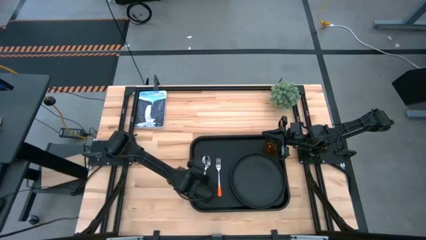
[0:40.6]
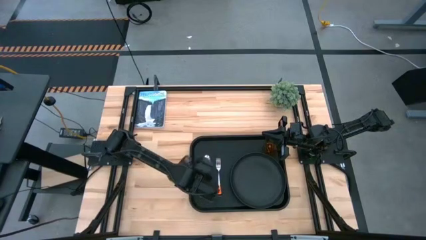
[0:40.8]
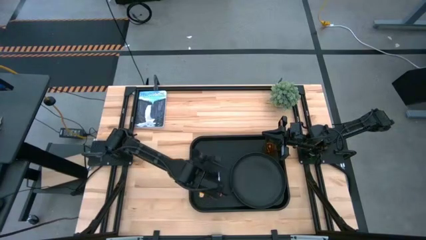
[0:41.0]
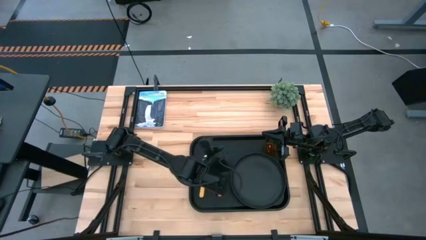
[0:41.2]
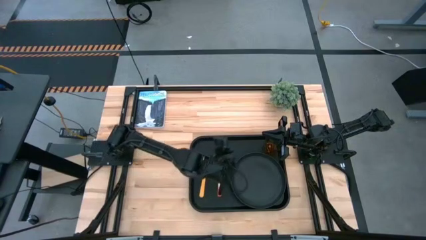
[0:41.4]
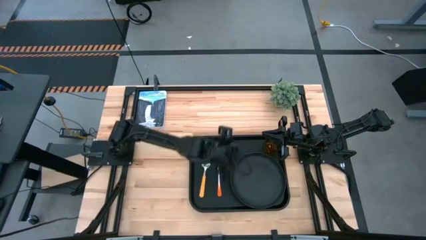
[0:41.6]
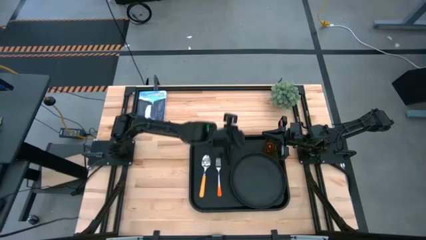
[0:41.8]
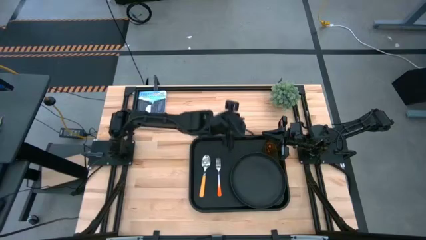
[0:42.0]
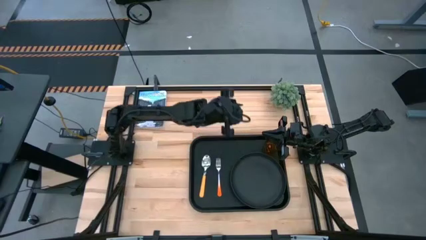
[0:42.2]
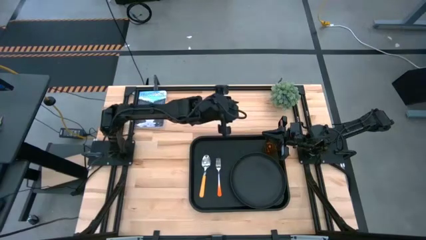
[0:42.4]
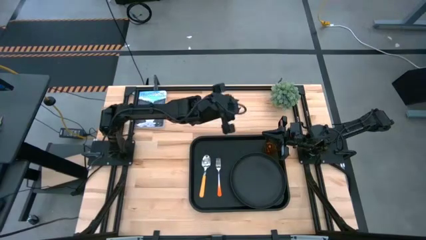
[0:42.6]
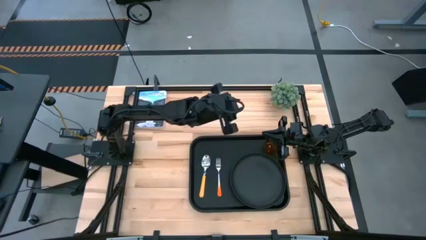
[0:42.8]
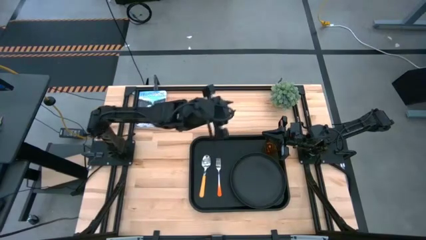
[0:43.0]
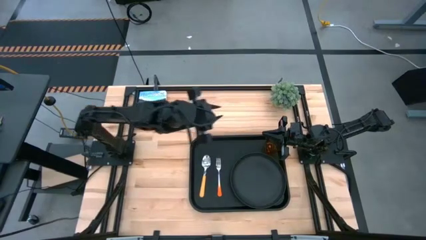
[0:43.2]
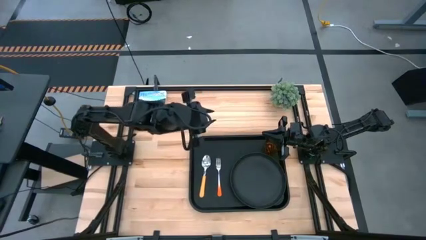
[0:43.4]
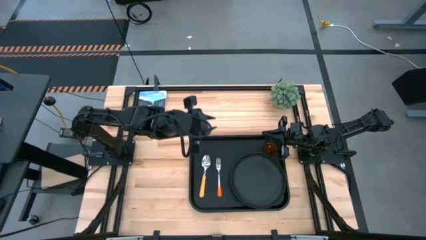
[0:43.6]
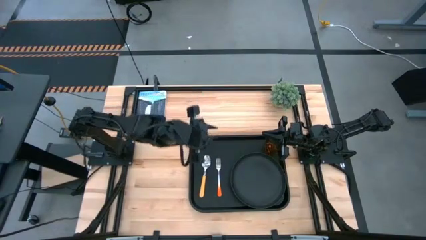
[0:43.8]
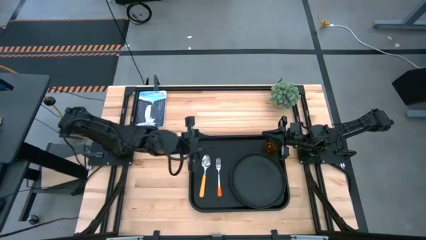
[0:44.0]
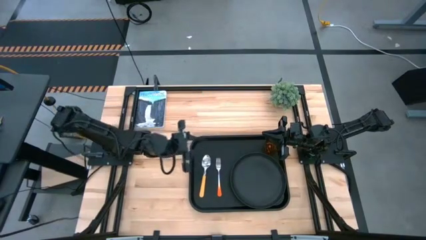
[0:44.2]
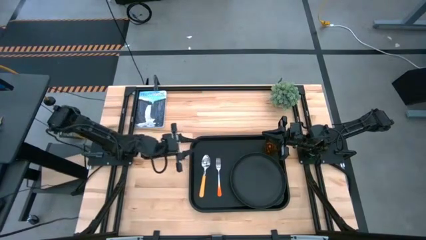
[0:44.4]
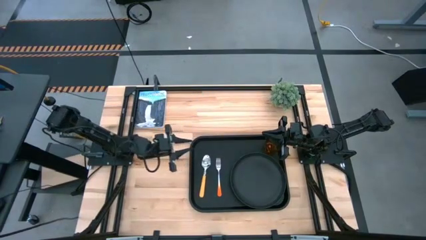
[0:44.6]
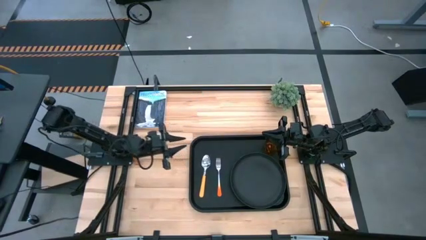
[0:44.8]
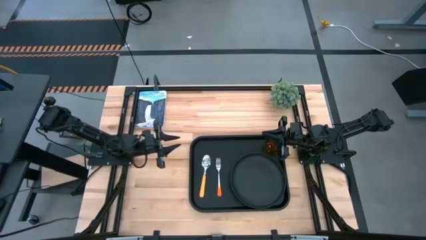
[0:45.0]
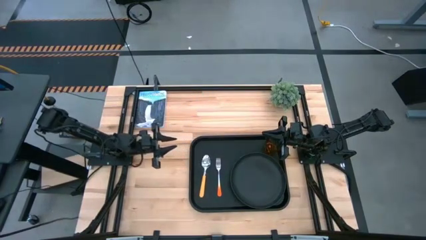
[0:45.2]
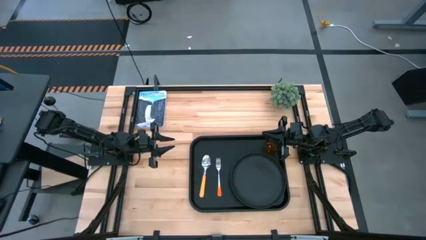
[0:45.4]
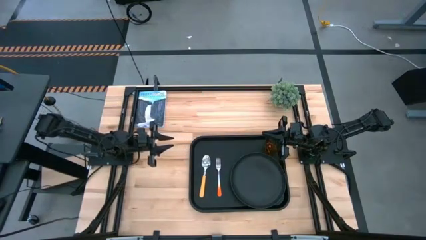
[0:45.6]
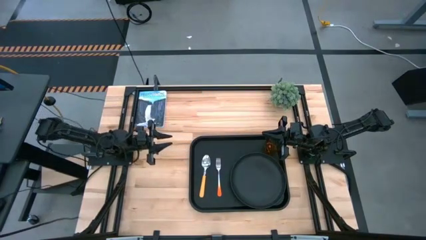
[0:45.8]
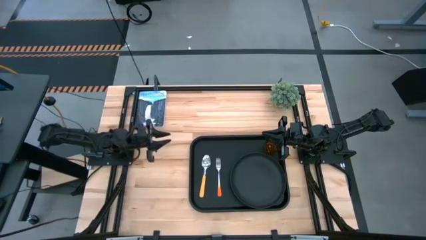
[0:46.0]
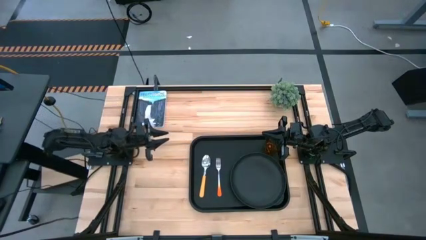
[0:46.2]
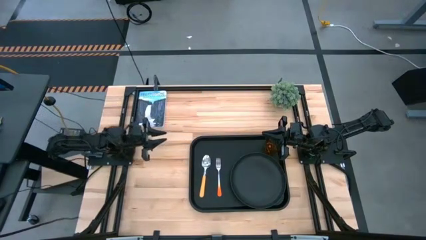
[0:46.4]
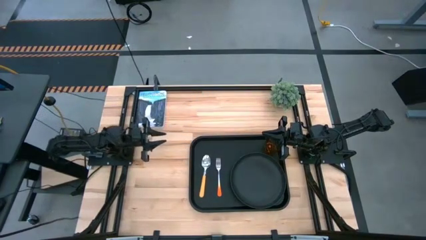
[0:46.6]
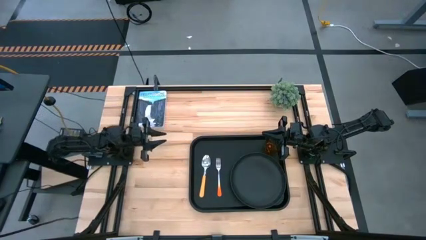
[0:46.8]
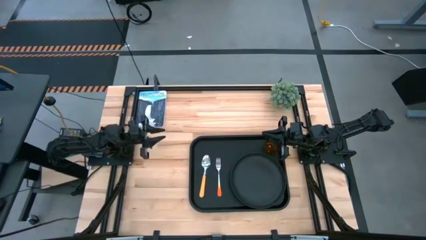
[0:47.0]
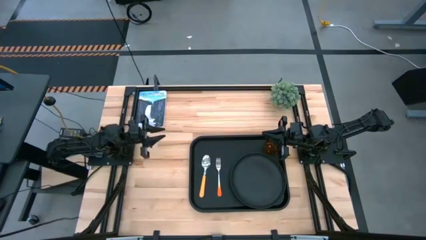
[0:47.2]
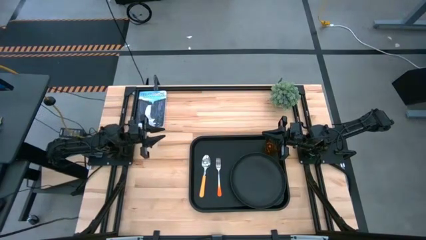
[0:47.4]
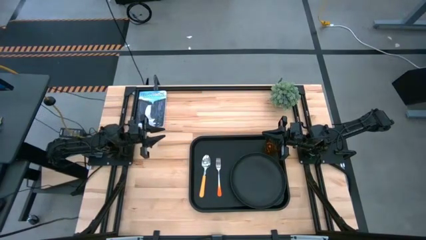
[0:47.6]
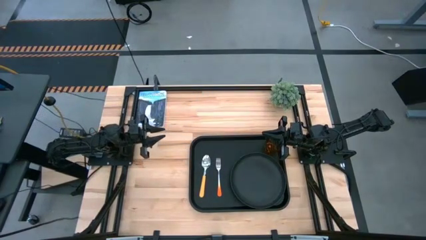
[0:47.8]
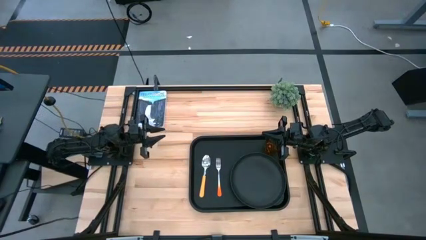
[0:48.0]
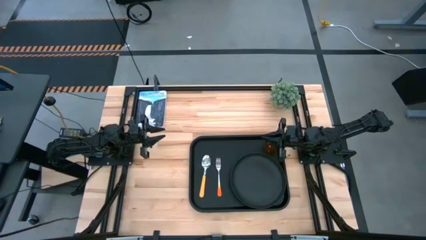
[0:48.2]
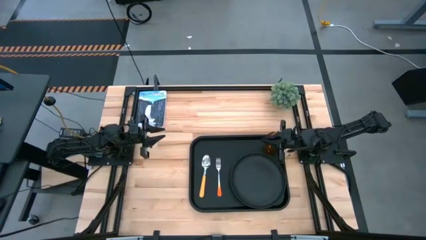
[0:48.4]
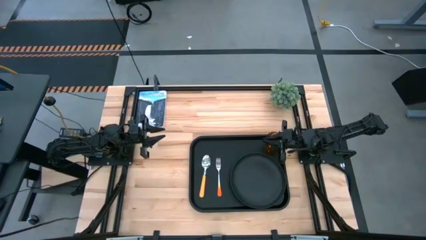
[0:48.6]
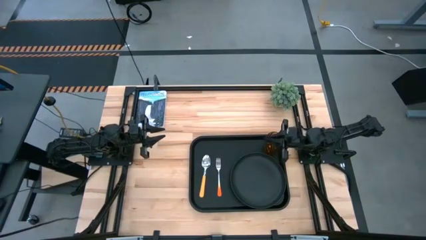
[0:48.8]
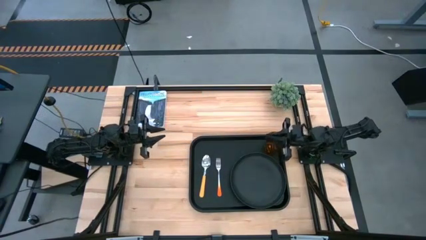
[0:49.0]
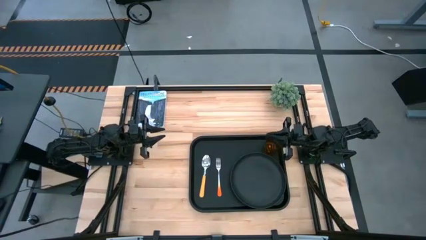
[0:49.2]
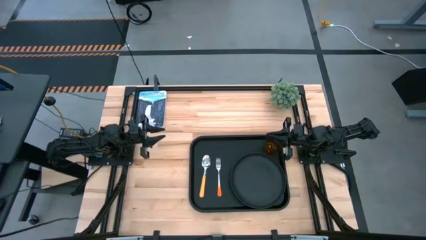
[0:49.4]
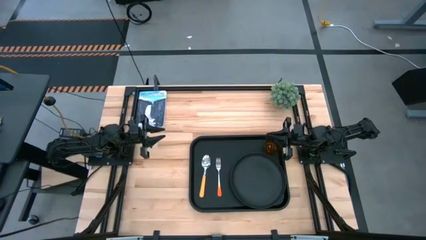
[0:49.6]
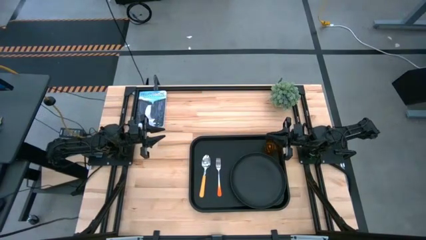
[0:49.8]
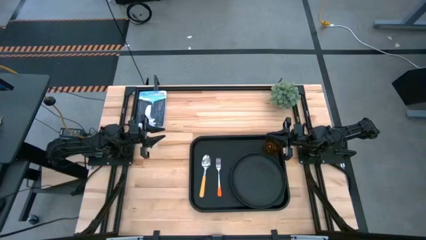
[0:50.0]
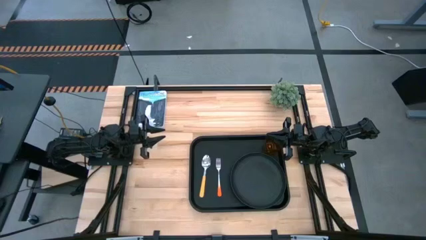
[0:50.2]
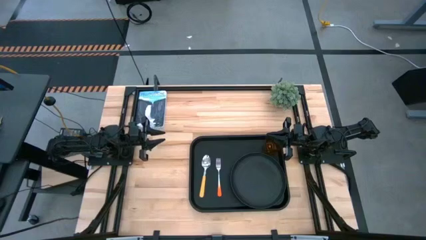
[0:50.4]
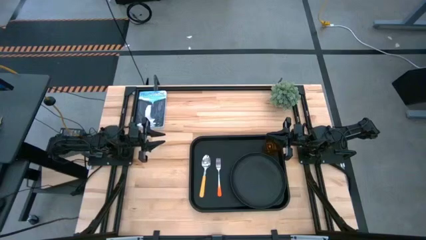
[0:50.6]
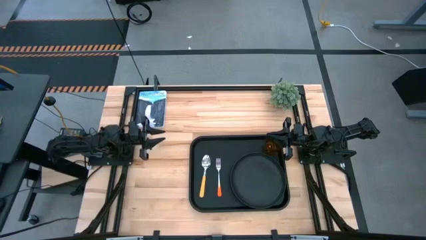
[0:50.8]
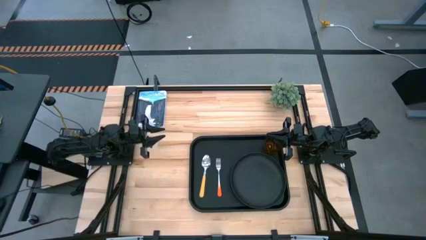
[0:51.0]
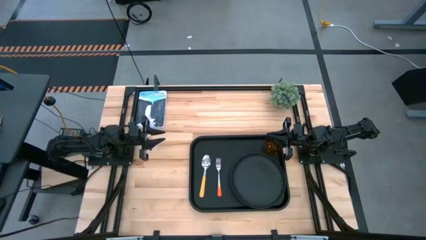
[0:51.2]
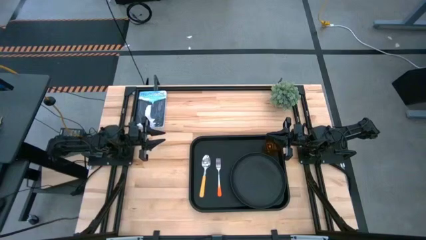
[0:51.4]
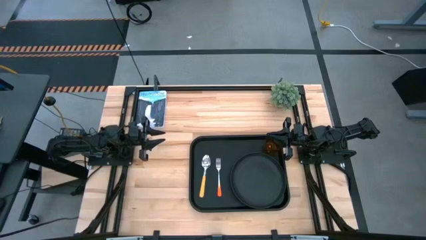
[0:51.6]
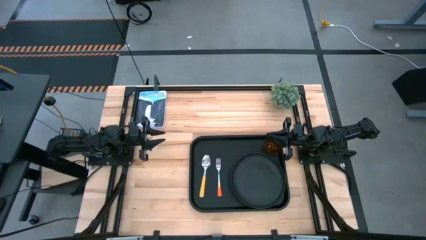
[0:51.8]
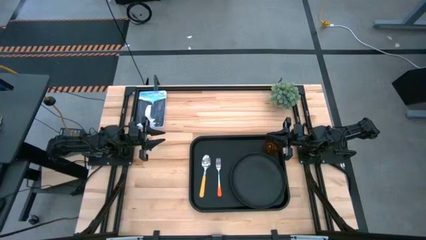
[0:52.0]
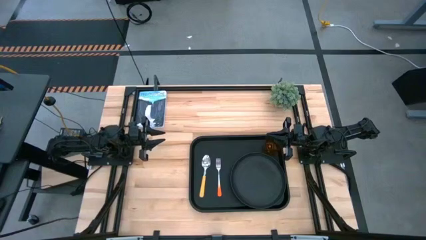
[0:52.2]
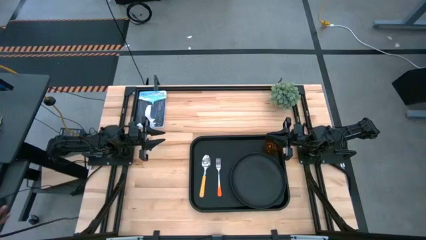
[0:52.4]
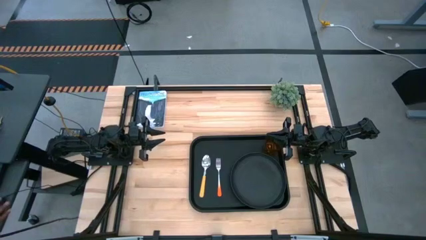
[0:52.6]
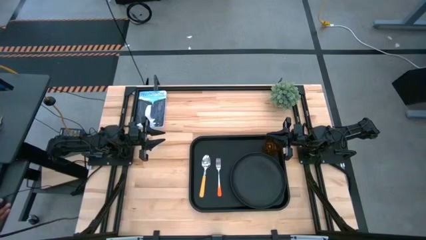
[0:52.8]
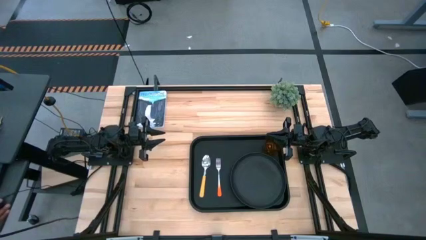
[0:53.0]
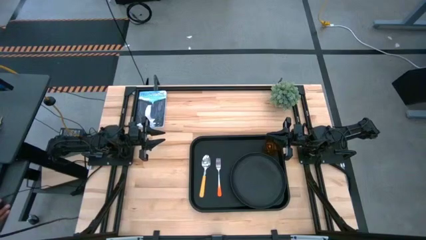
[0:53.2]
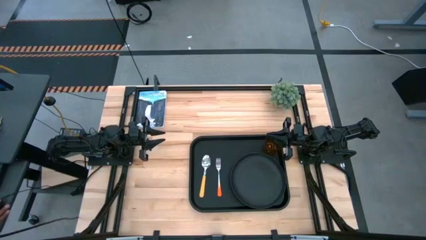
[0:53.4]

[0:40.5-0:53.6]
Task: Pick and place plate/cup/fork/spoon on tray
Return to Home Position

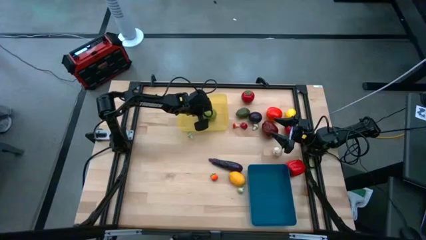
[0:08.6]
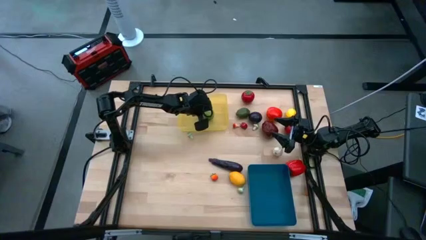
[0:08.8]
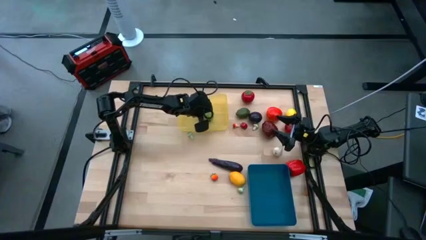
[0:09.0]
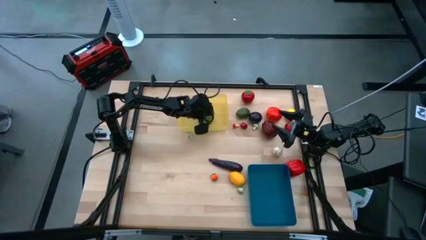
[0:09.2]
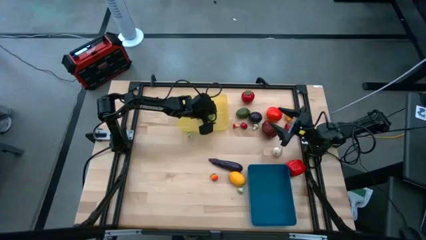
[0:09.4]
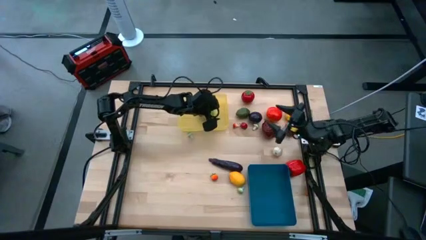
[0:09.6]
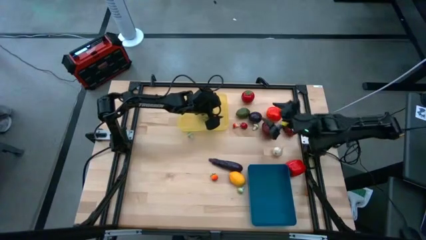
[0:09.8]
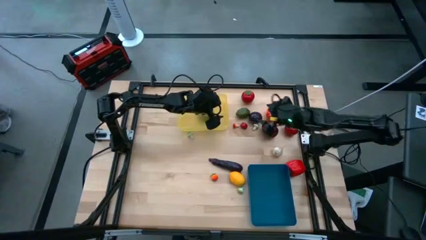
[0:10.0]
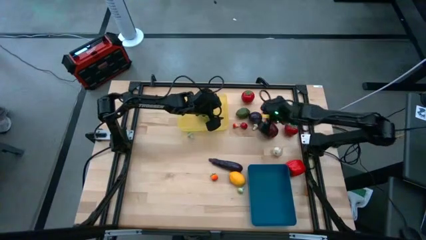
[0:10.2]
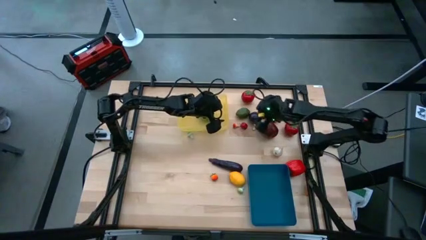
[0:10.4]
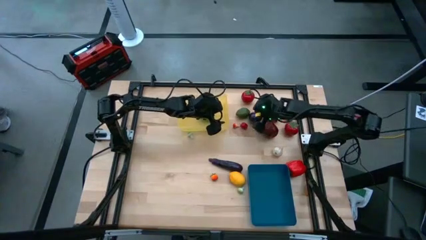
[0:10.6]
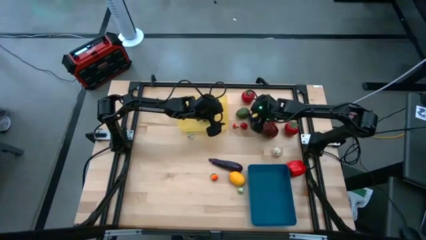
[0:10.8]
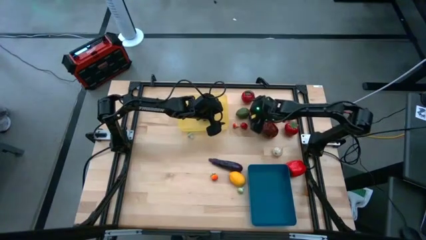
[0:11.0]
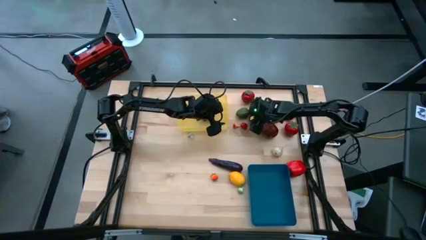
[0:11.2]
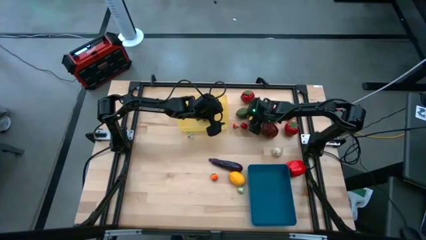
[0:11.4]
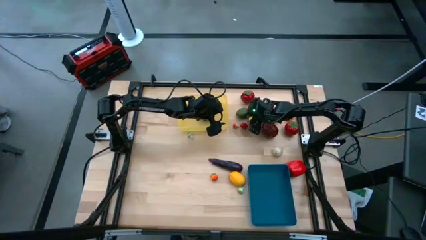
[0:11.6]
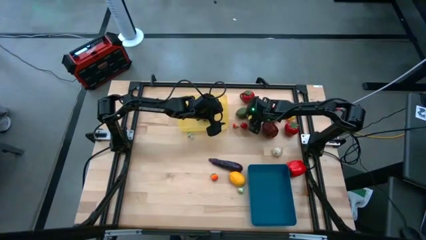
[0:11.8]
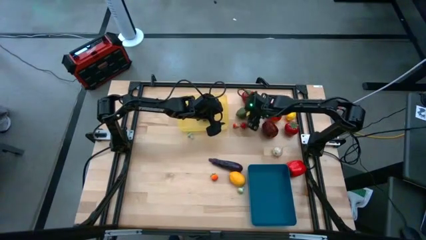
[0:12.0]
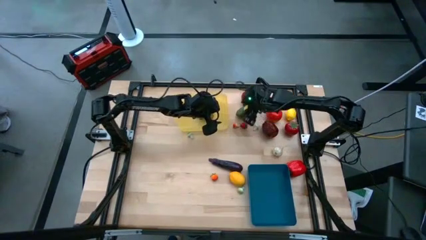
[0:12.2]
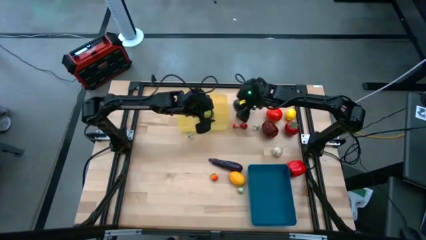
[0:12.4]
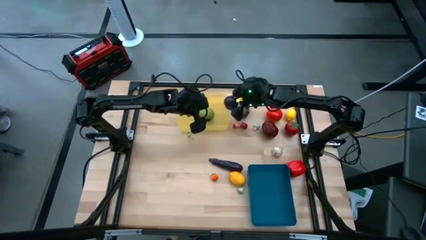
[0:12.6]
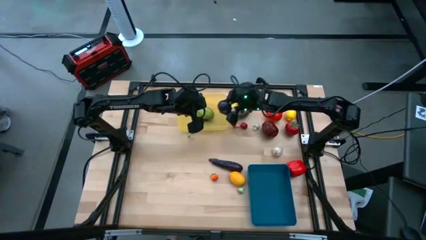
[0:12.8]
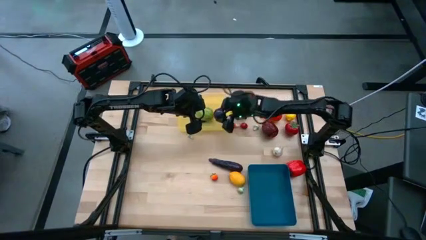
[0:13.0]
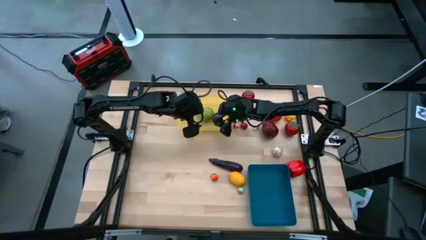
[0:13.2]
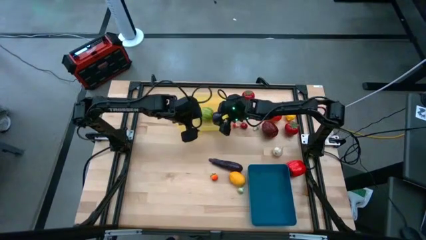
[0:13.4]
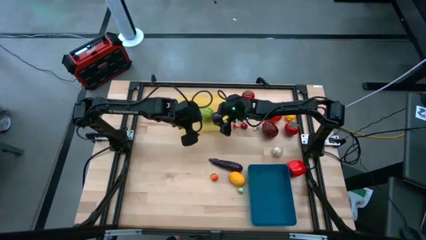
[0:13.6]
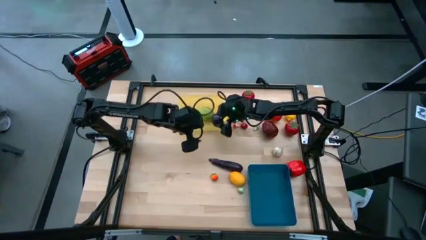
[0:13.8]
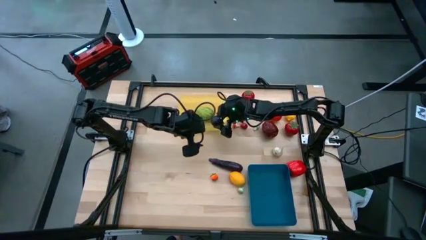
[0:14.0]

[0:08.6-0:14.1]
Task: Sort produce into baskets
Put the violet plum into the yellow bin
